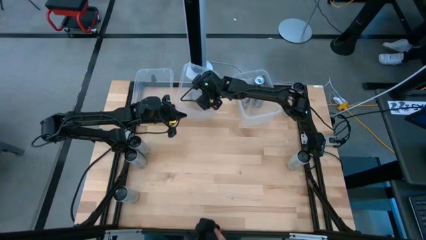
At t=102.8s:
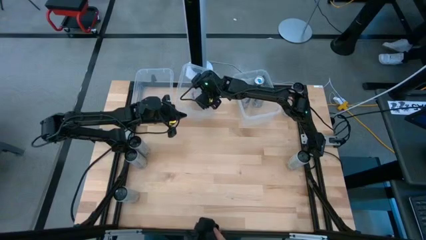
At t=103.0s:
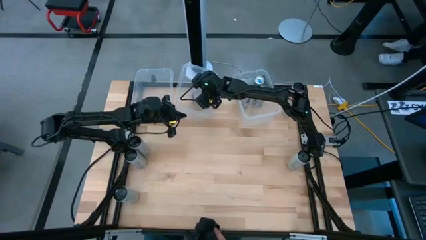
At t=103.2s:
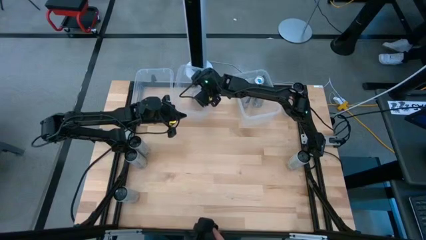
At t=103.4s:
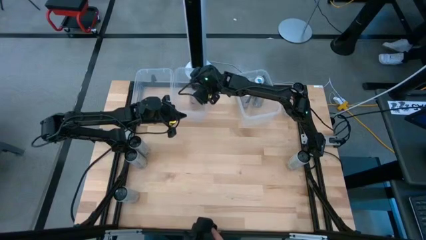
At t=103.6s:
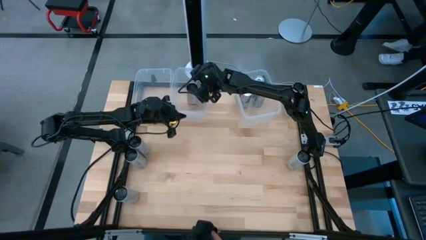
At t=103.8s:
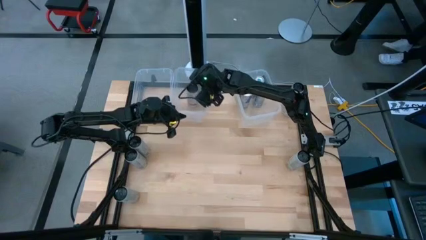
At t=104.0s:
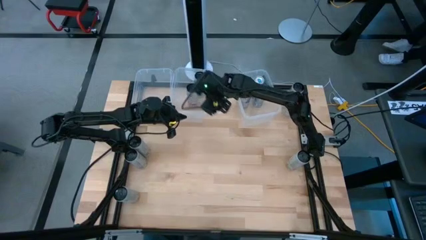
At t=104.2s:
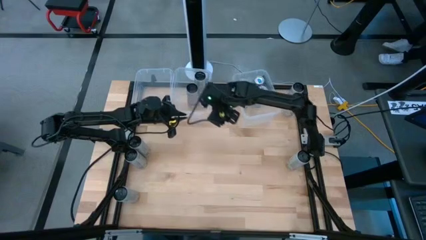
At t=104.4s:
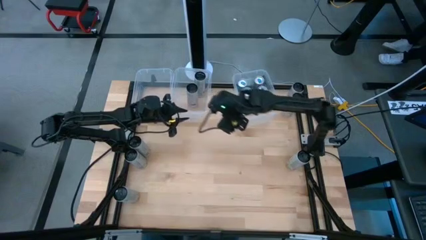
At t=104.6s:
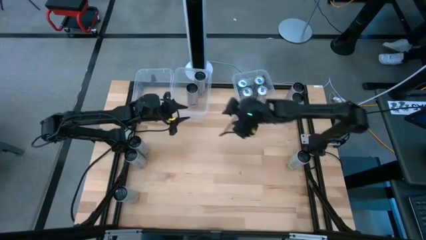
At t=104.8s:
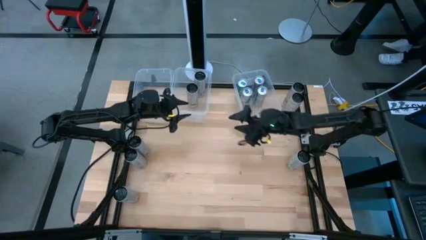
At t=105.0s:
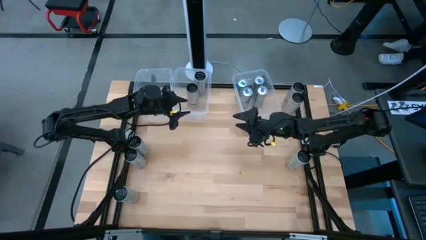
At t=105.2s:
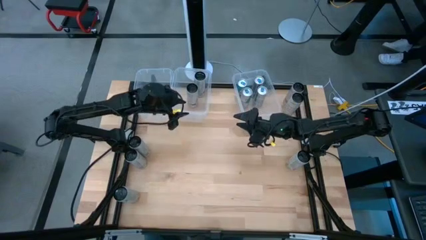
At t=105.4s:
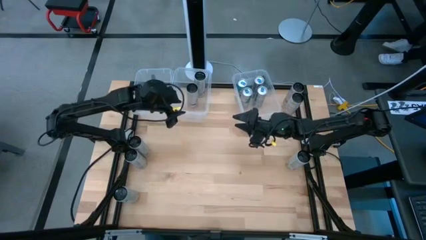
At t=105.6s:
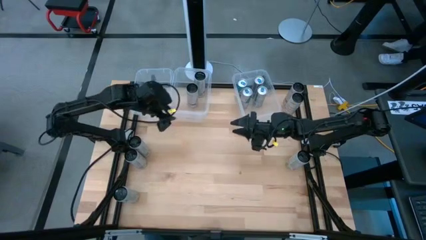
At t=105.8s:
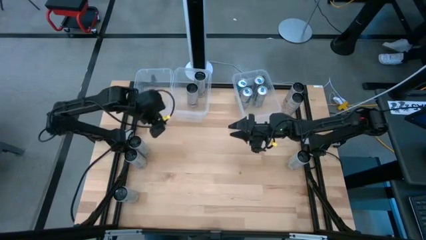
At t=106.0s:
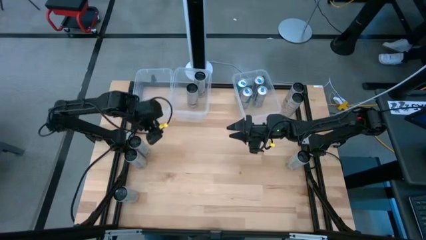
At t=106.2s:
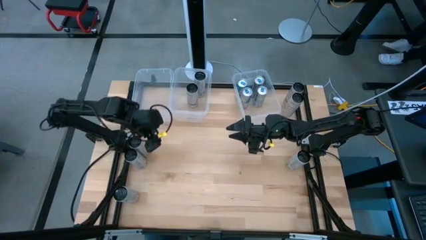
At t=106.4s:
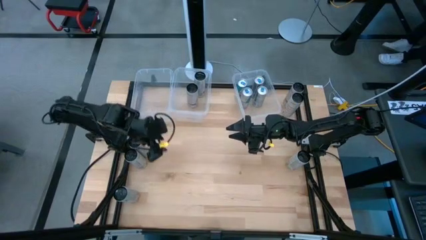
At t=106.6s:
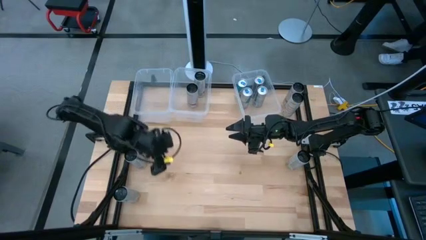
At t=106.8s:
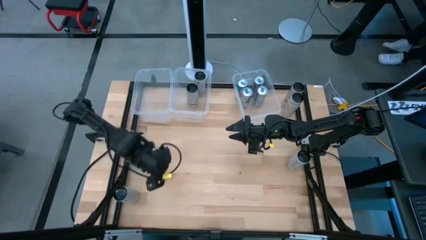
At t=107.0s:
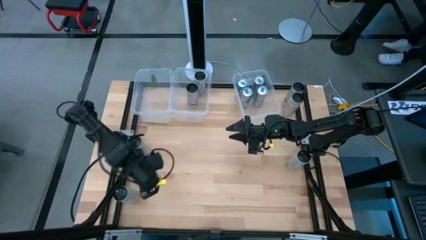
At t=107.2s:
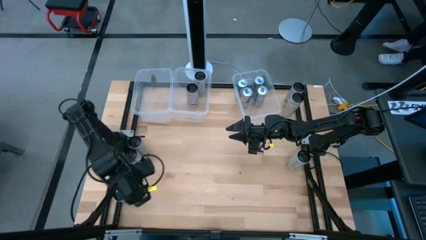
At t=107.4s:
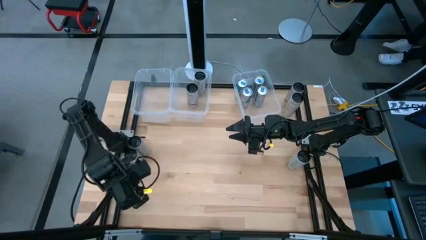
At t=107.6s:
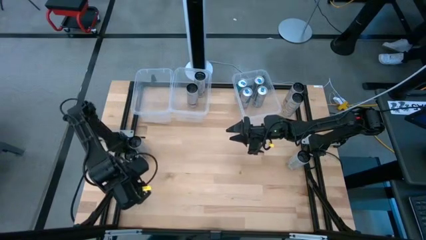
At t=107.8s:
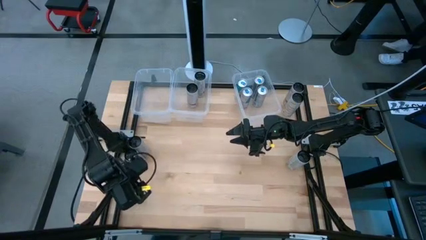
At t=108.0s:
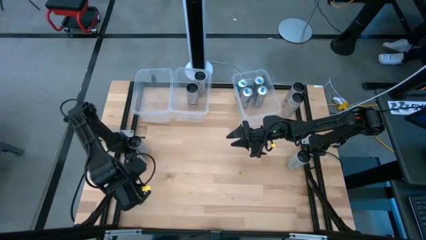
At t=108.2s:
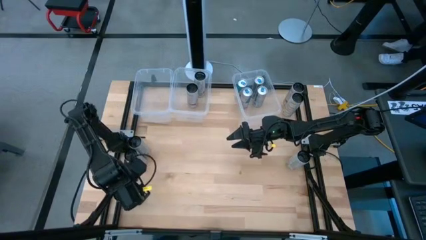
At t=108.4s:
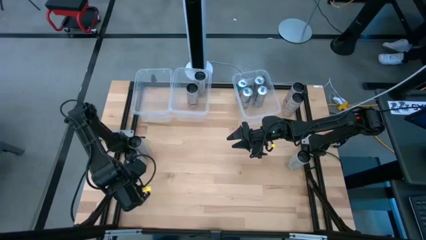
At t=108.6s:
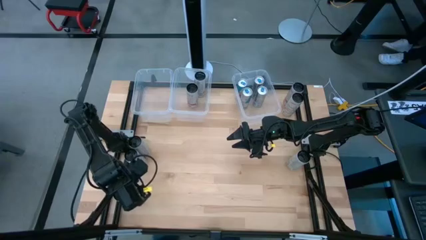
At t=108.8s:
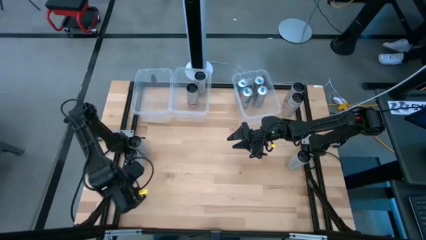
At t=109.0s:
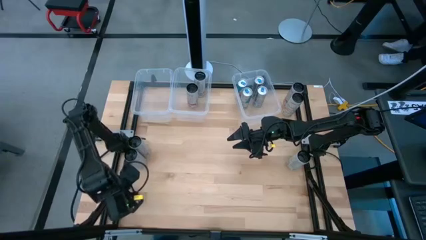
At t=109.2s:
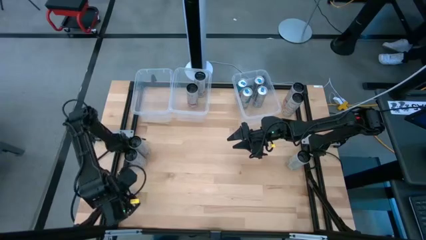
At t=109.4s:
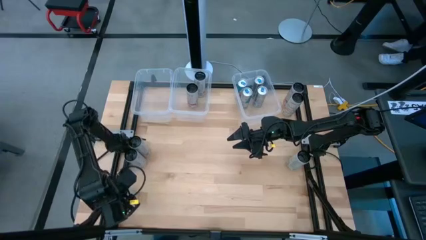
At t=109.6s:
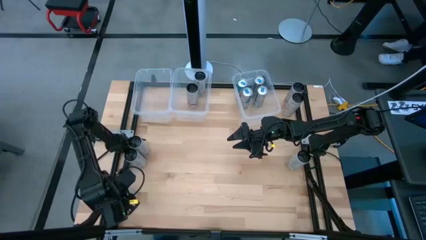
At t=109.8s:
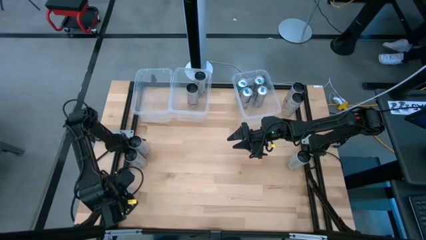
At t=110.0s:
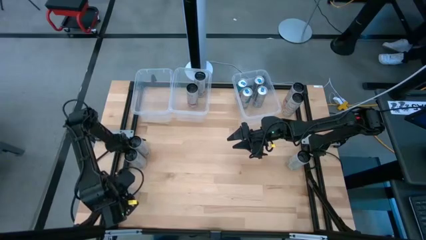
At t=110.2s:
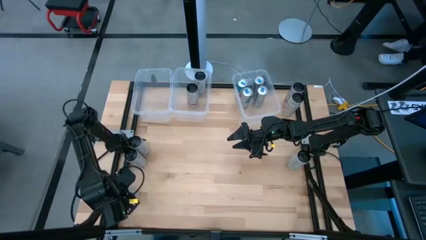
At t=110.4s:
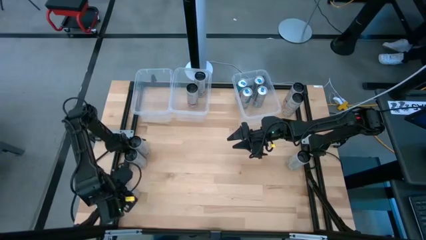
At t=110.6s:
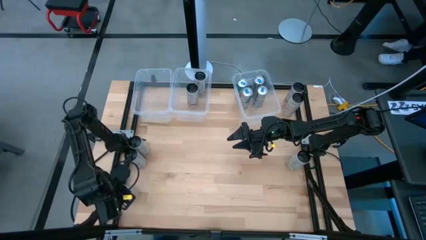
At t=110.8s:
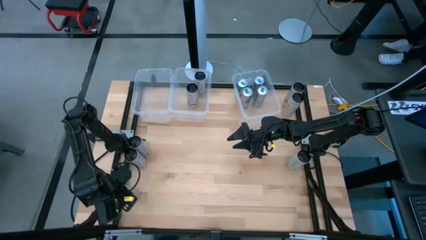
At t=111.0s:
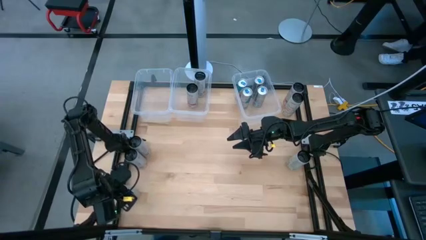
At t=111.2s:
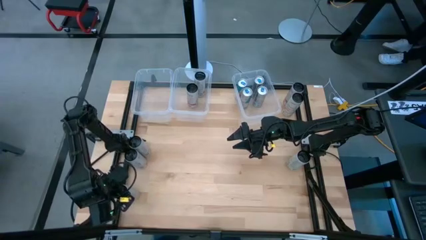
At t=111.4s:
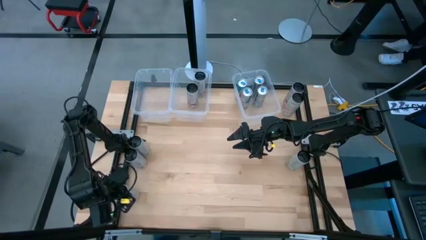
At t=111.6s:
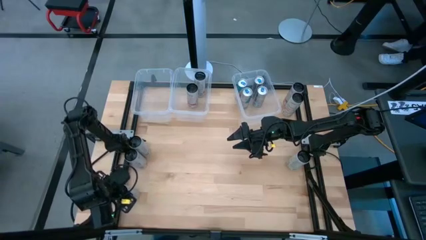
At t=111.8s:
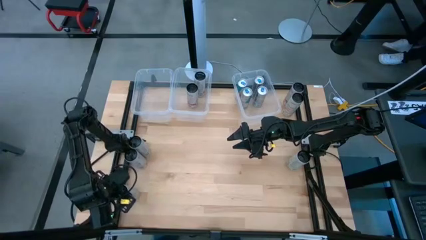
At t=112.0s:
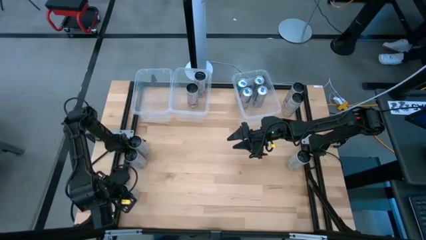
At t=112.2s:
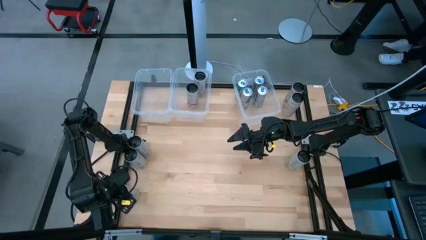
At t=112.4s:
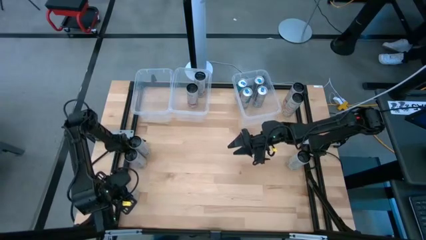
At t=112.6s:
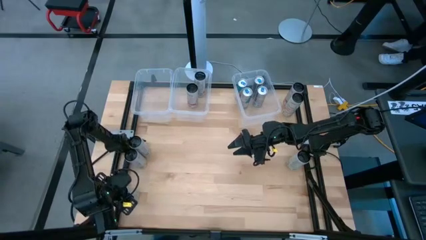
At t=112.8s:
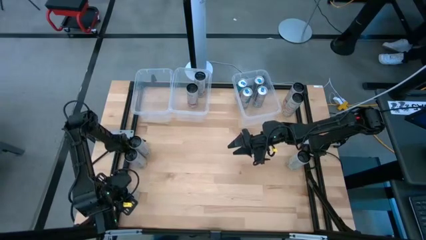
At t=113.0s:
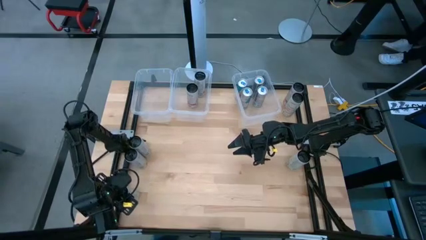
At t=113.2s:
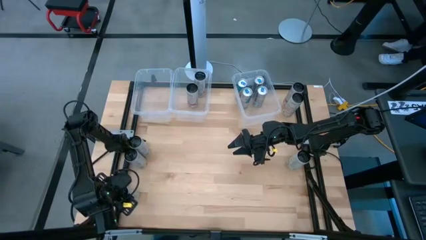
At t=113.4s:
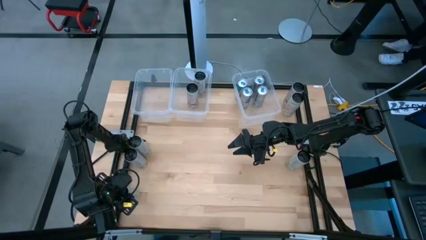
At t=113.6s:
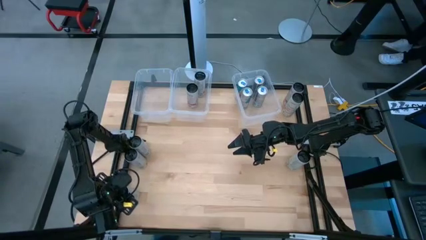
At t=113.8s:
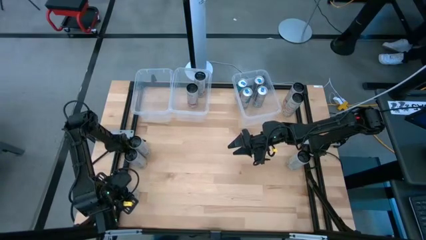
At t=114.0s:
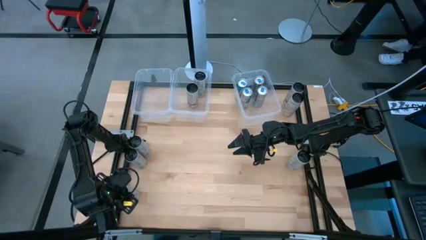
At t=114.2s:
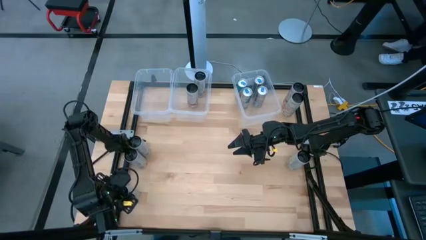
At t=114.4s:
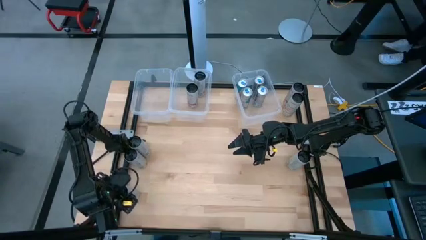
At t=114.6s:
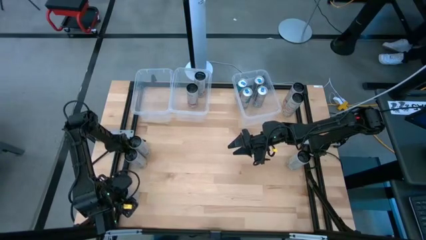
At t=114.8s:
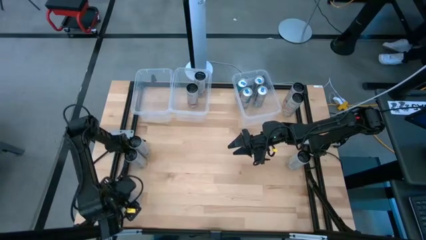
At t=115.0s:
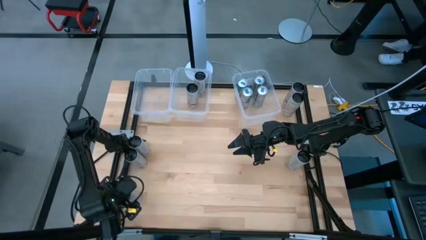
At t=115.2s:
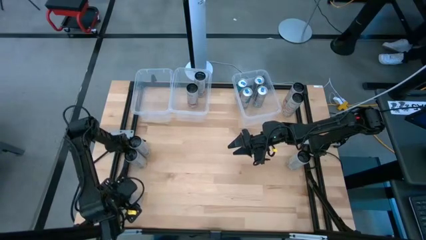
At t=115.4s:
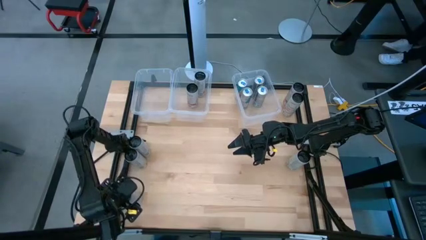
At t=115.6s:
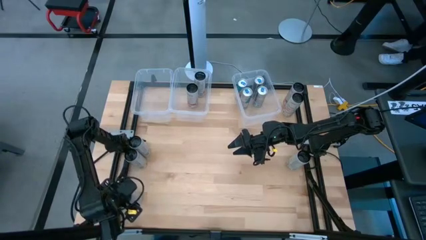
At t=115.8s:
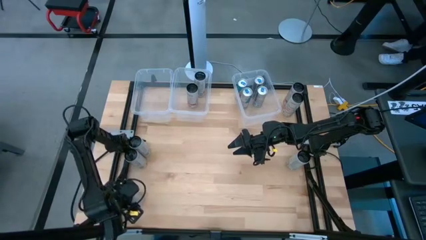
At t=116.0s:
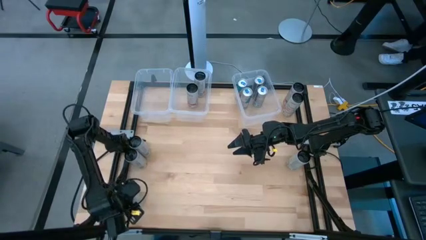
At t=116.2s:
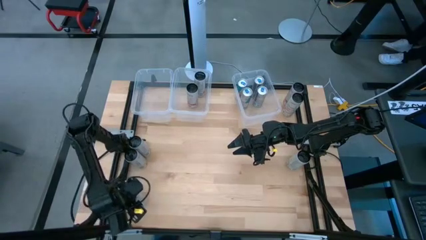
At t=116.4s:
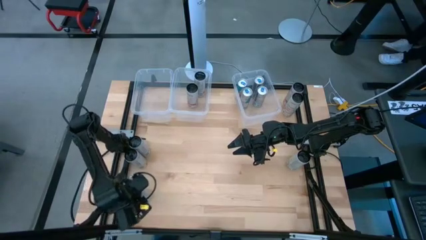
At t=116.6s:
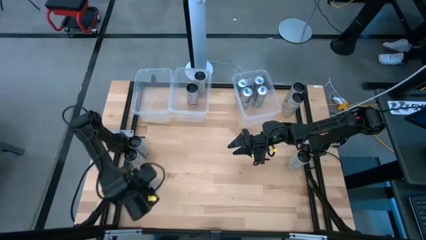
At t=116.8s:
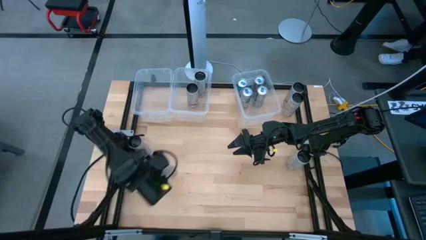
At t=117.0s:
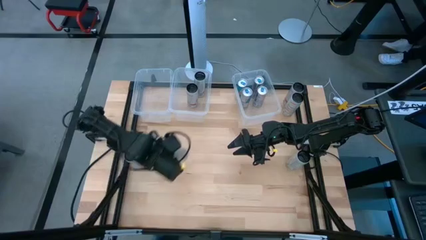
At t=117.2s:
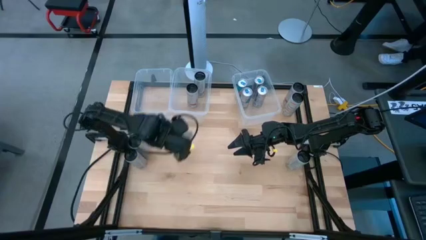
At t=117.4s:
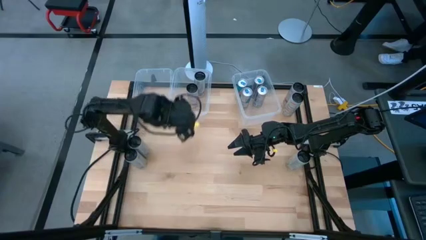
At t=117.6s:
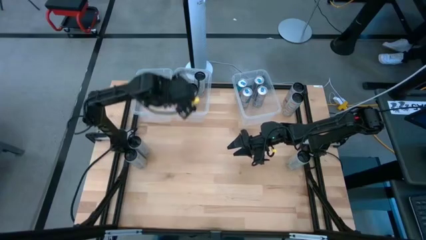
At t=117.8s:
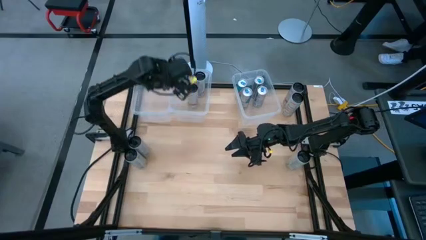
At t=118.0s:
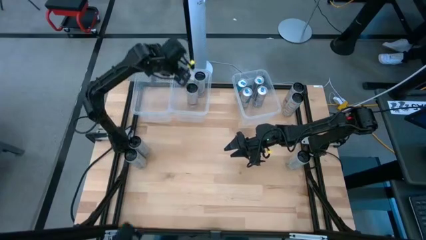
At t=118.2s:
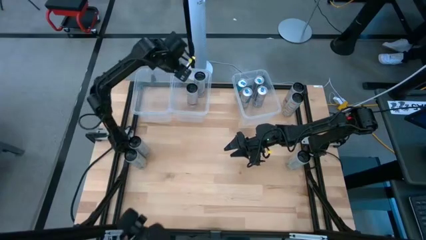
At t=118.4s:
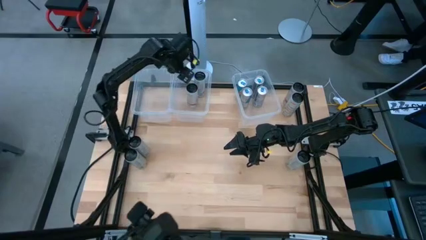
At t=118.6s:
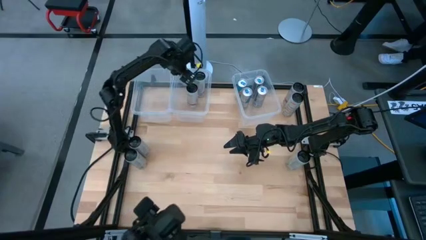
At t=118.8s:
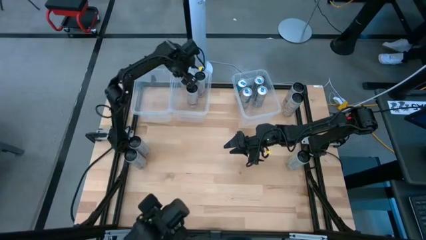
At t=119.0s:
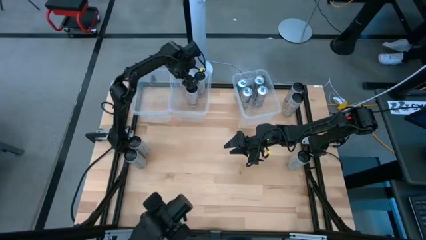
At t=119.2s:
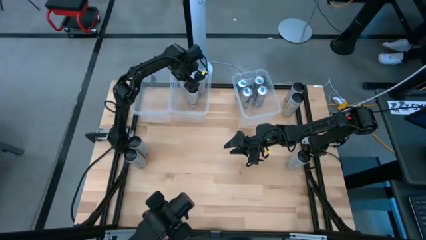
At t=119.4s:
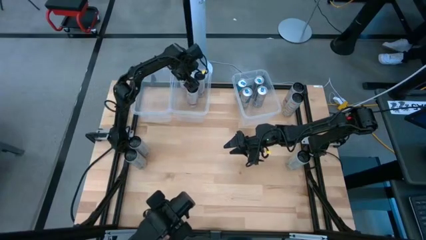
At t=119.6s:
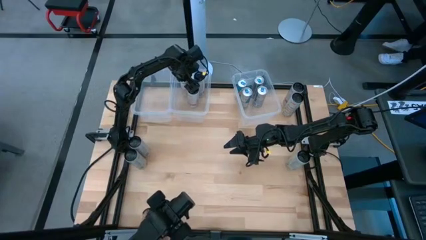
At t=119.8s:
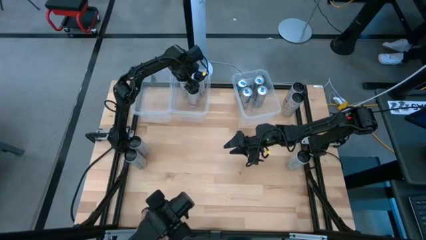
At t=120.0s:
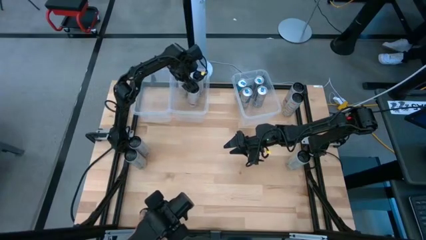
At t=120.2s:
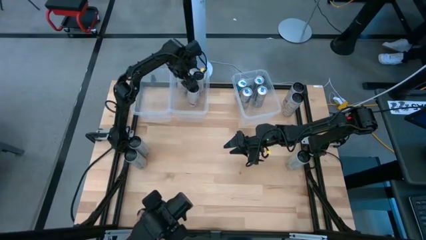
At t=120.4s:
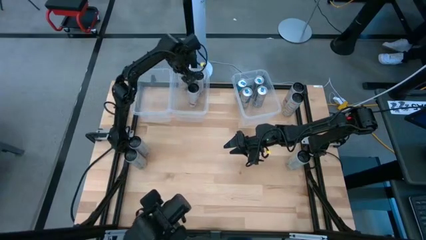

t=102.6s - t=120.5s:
Task: Sort soda cans
Put the bottom left white-pink soda can into the top center transparent bin
